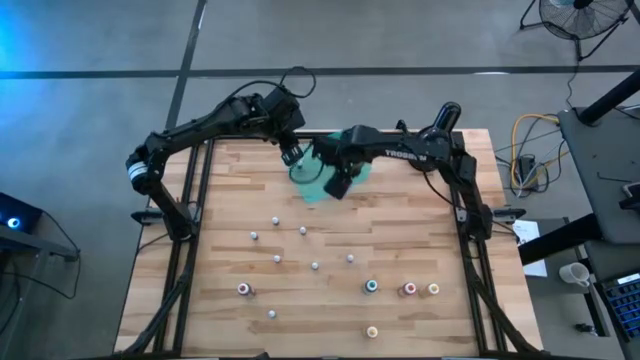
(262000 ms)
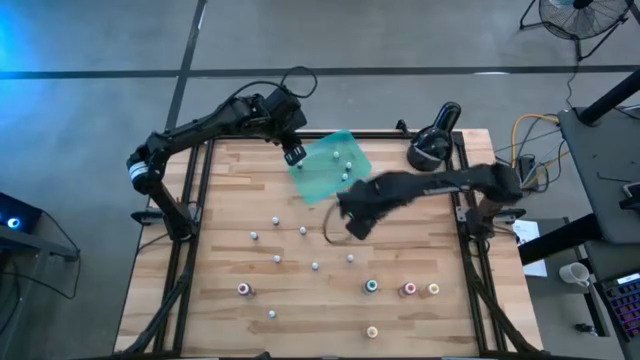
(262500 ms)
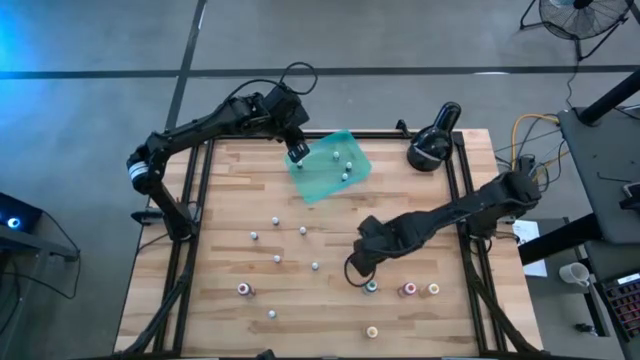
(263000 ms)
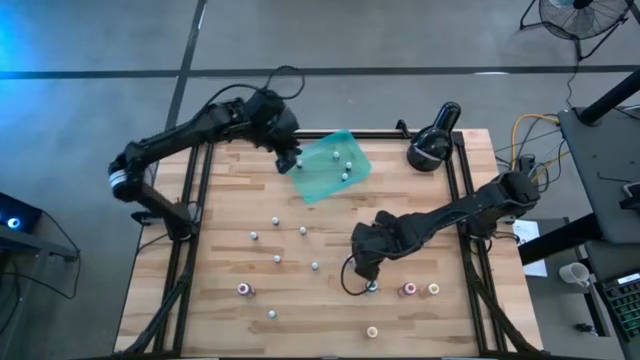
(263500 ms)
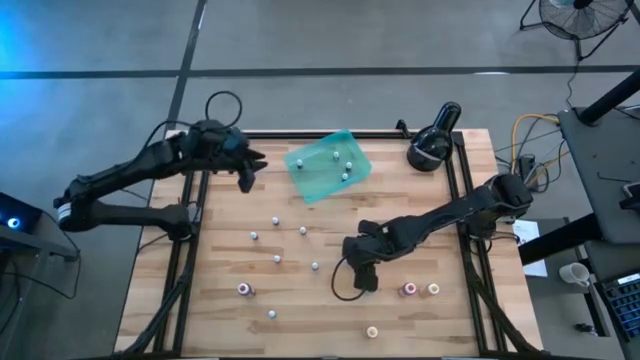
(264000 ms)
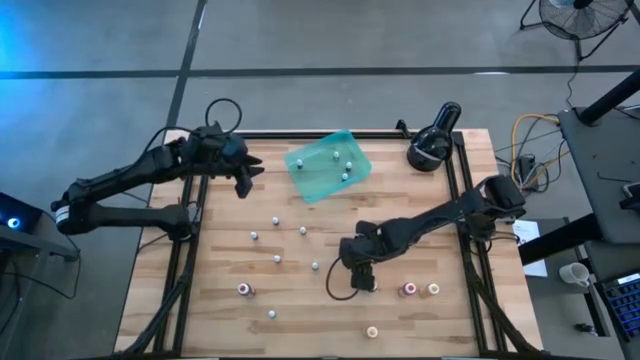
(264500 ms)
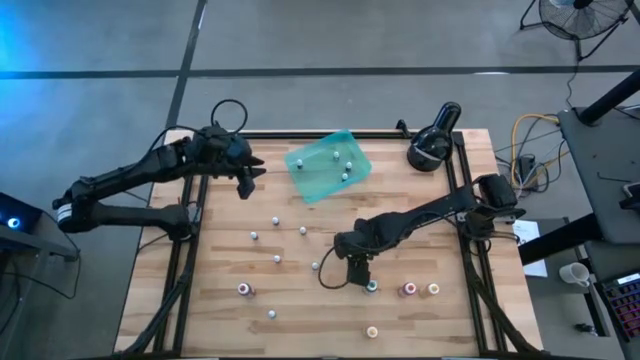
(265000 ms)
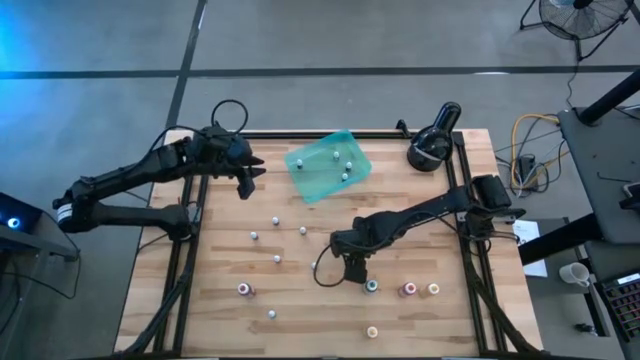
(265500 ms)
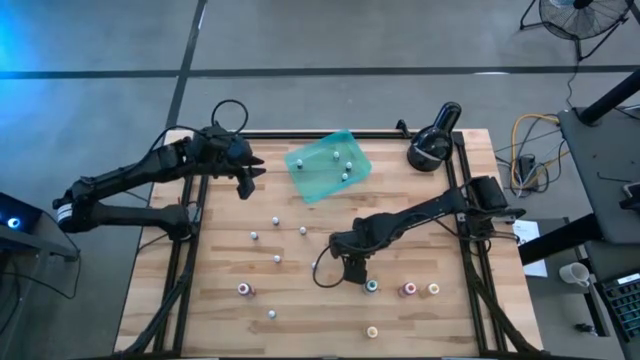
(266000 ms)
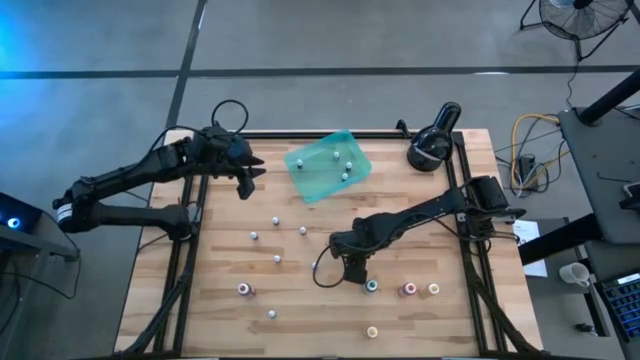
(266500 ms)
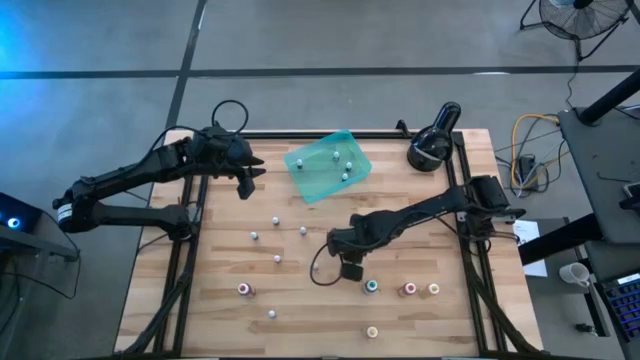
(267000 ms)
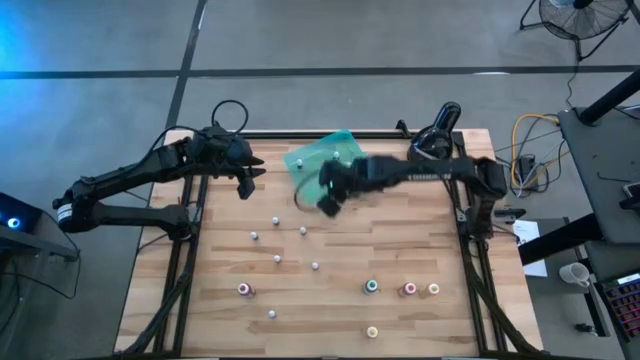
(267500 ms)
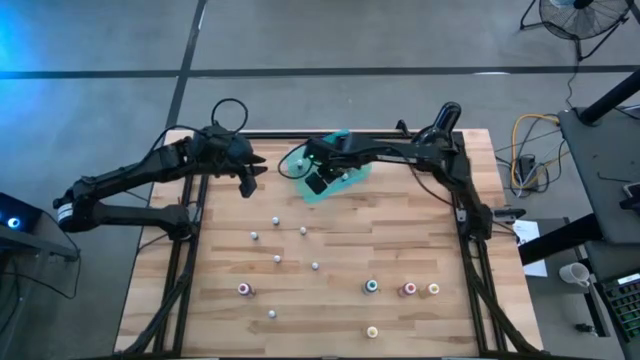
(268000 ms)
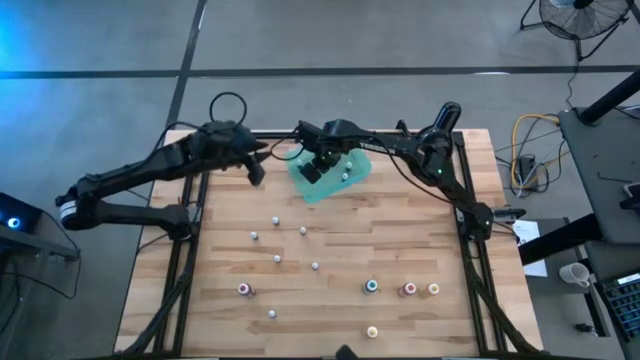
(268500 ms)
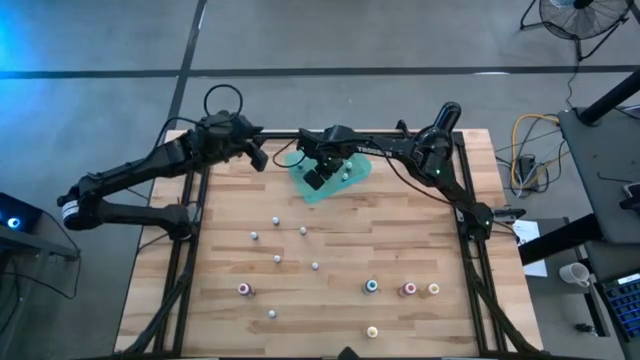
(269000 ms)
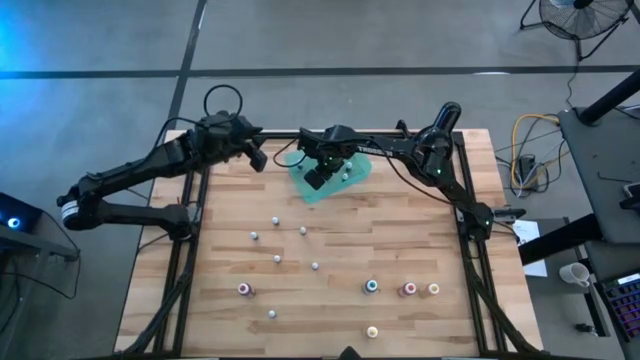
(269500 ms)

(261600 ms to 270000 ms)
Task: Pick & Place food coloring
Put the black small food coloring into the green bin

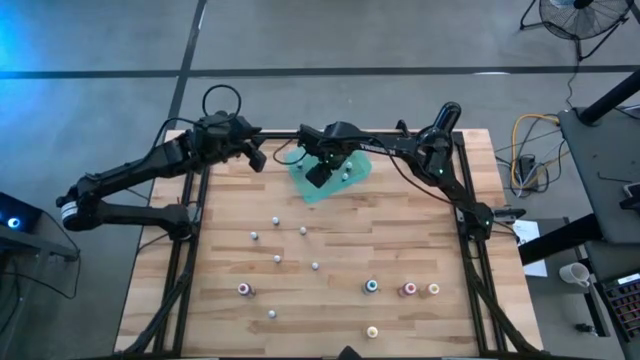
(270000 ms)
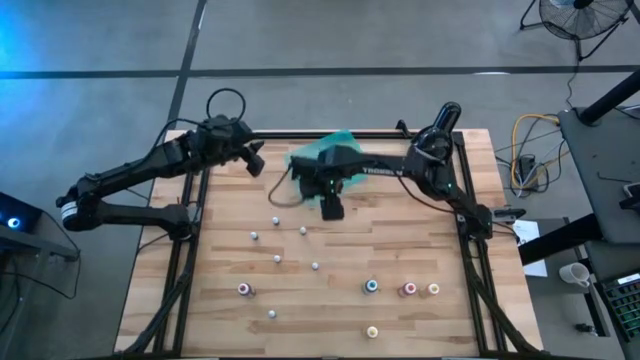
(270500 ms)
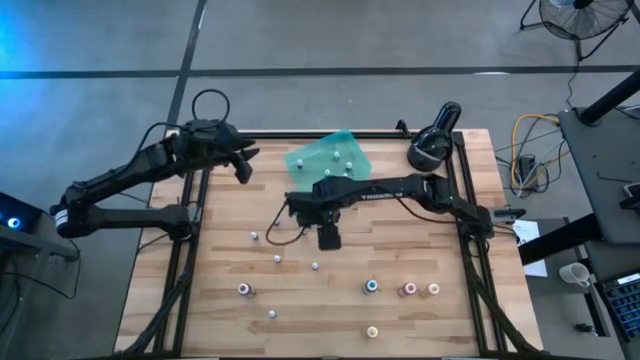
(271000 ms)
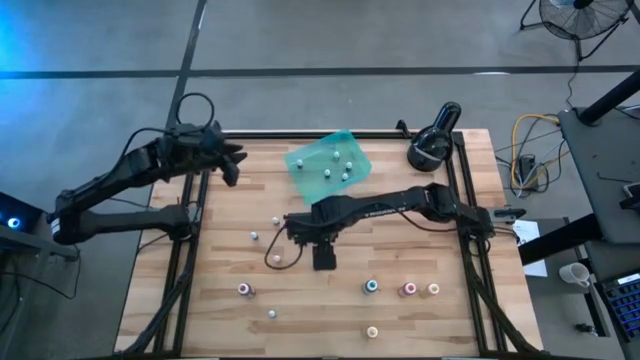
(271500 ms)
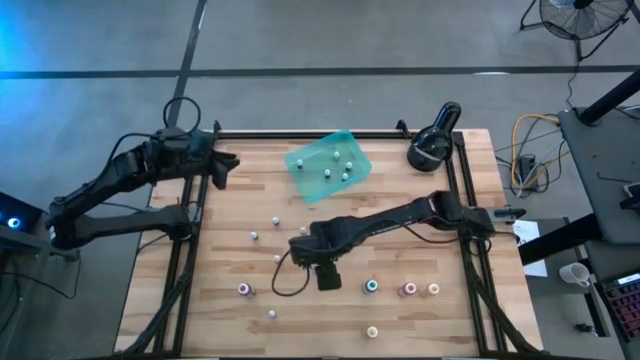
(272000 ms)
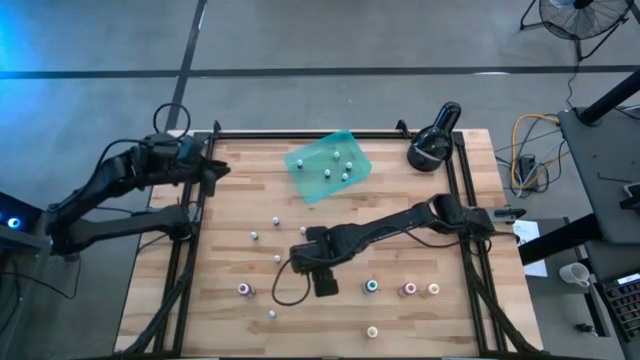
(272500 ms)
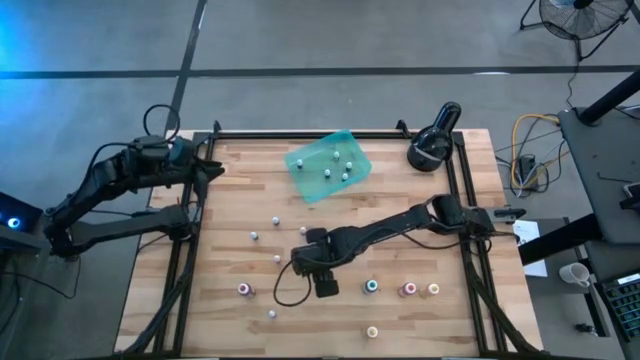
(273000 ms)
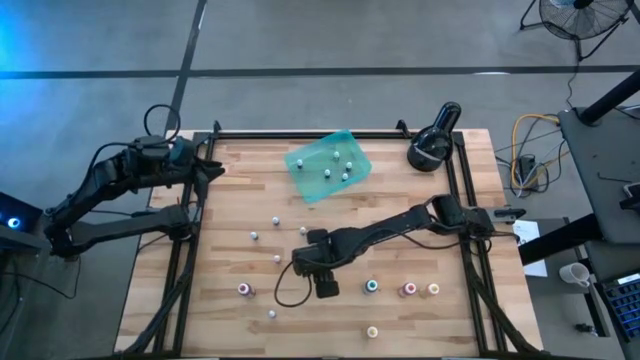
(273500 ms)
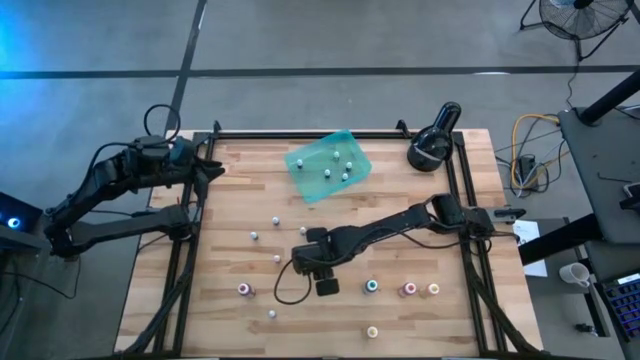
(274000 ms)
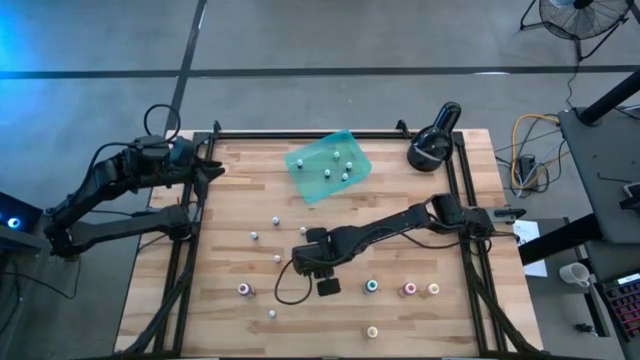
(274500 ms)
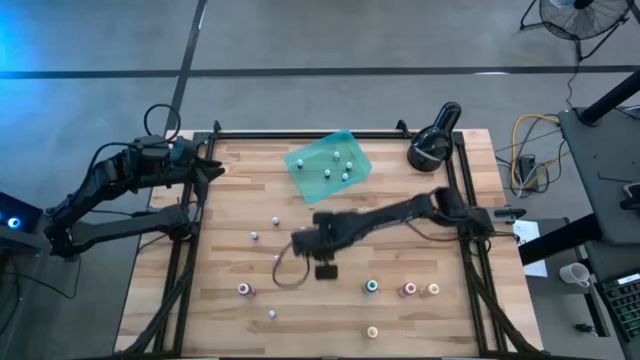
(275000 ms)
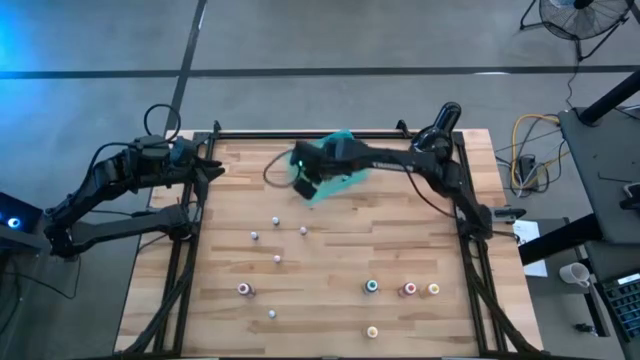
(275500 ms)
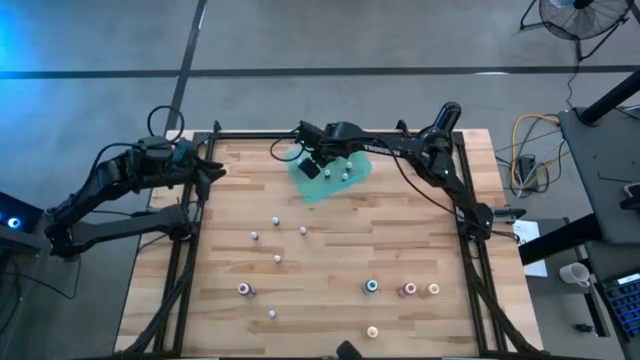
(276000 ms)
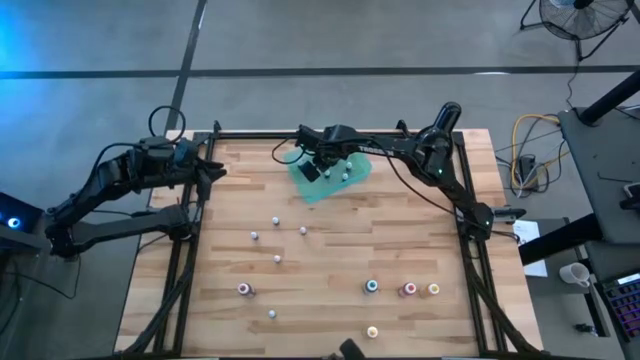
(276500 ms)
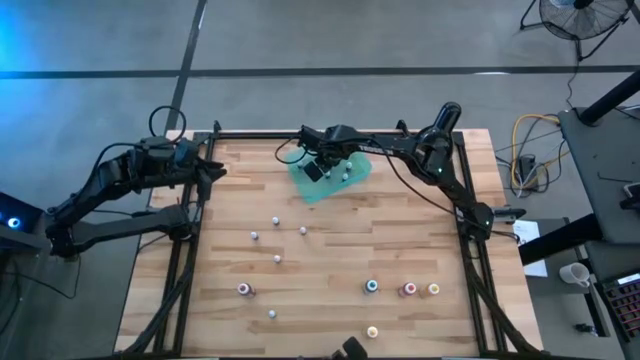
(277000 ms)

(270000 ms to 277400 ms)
Put the violet small food coloring into the green bin

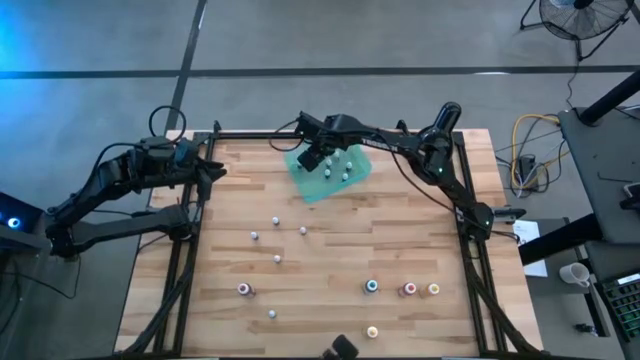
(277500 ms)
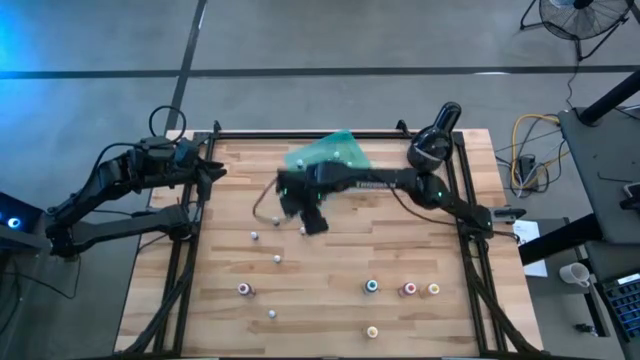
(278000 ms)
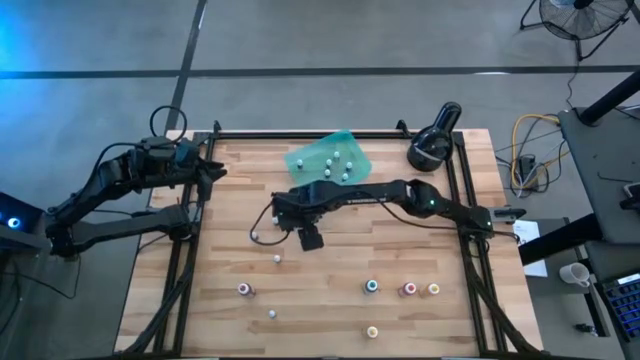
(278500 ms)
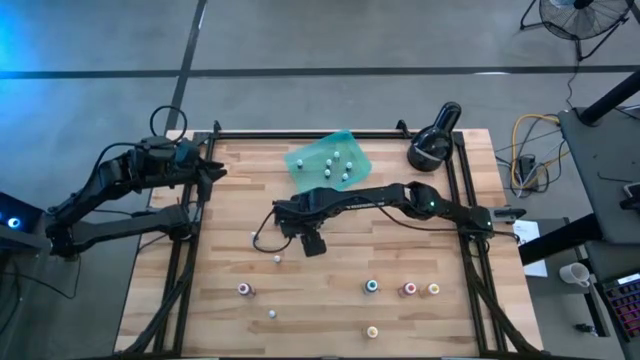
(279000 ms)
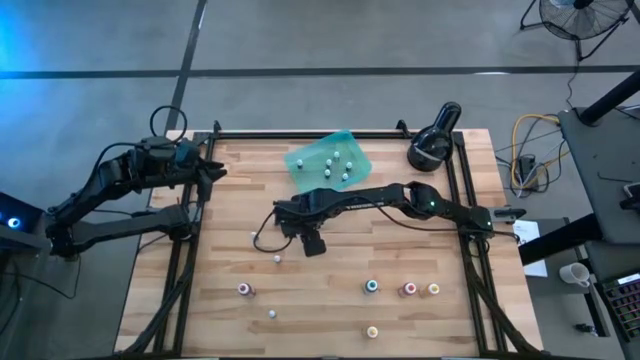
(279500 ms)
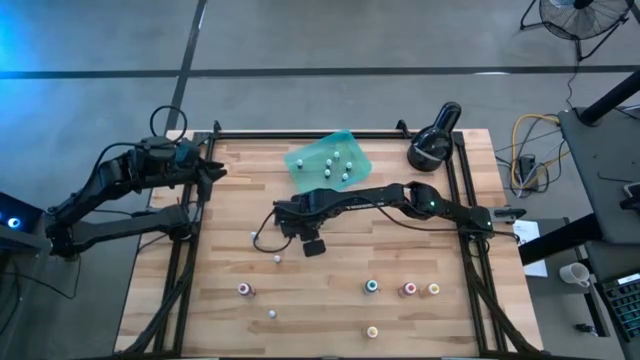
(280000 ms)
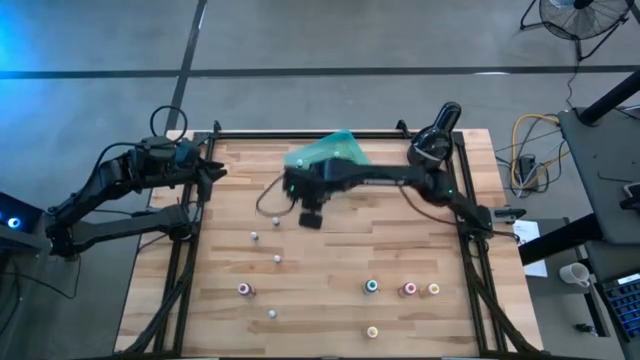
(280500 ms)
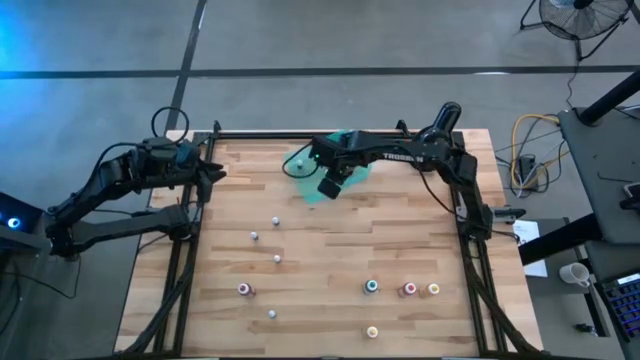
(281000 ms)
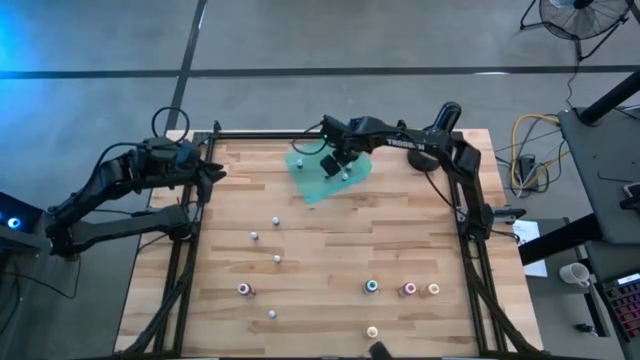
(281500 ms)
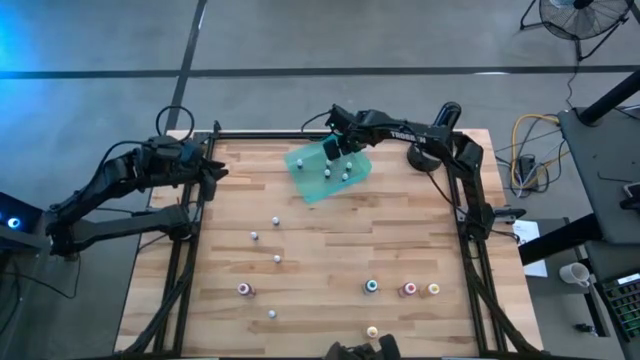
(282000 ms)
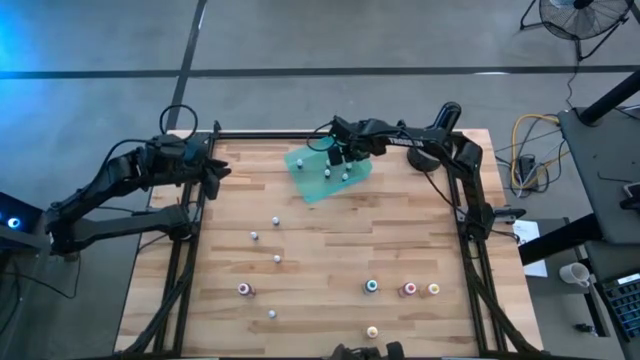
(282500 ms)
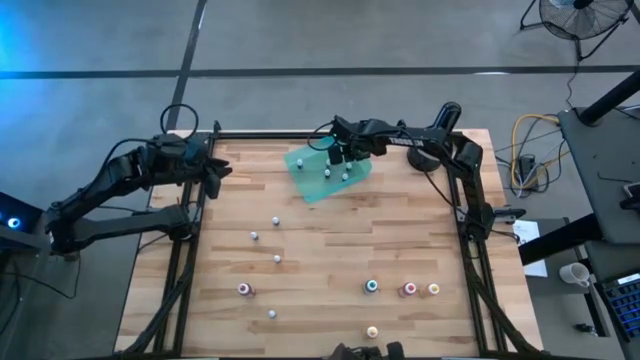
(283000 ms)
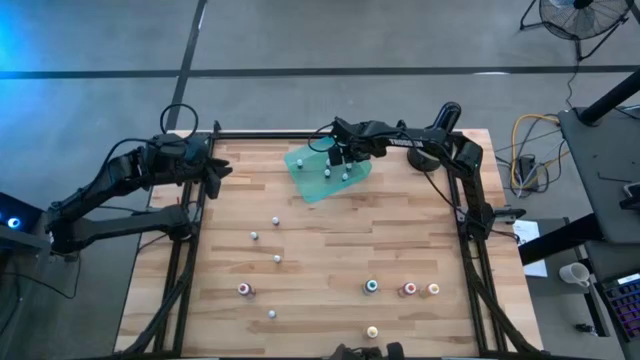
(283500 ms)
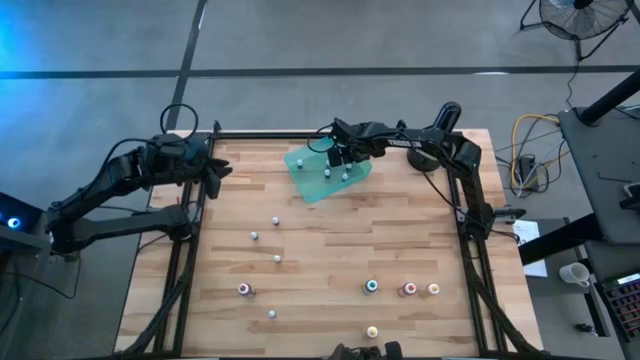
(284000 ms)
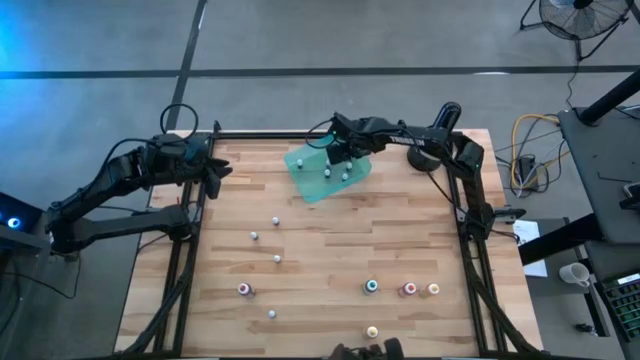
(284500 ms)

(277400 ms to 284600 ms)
Put the red small food coloring into the green bin
